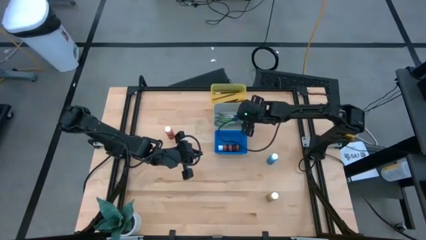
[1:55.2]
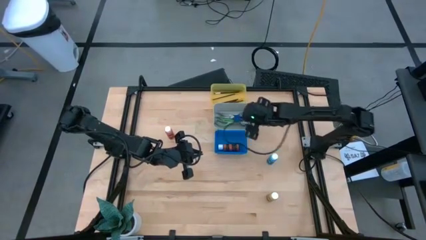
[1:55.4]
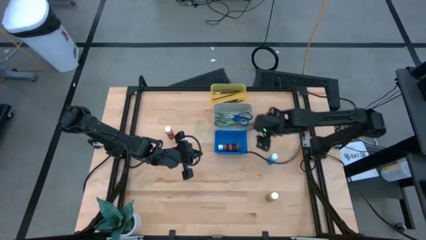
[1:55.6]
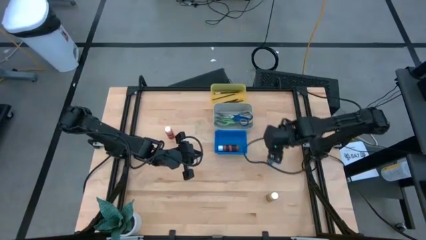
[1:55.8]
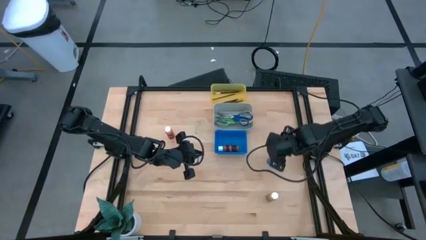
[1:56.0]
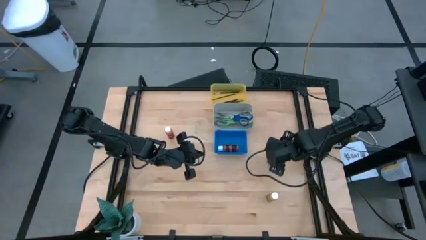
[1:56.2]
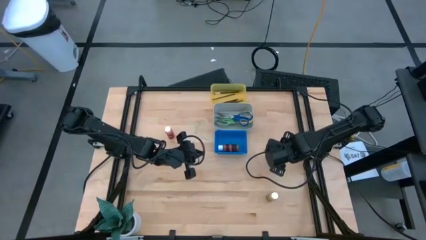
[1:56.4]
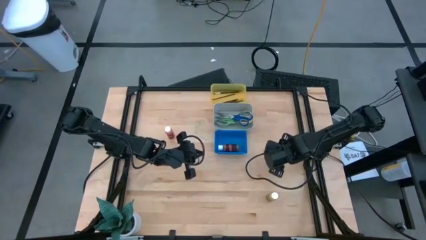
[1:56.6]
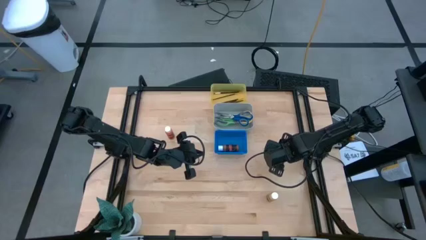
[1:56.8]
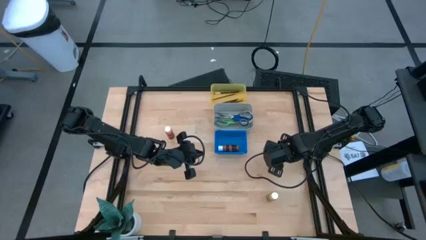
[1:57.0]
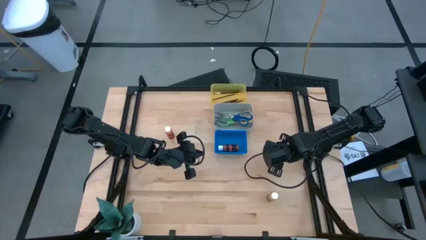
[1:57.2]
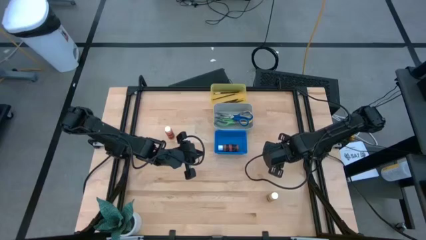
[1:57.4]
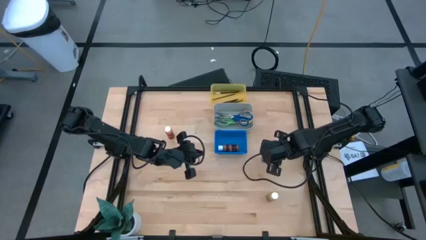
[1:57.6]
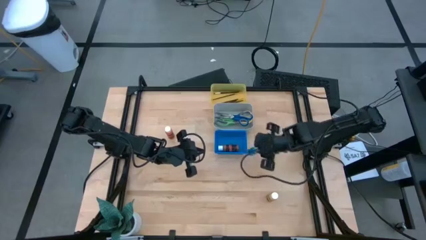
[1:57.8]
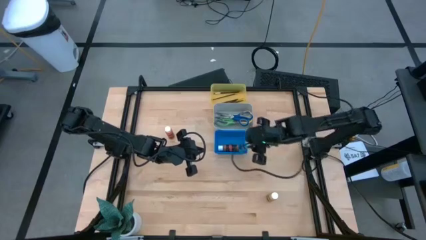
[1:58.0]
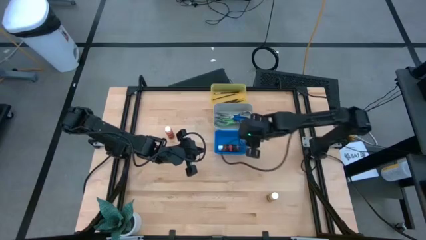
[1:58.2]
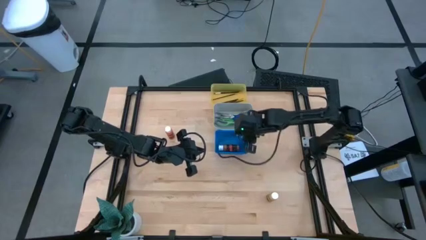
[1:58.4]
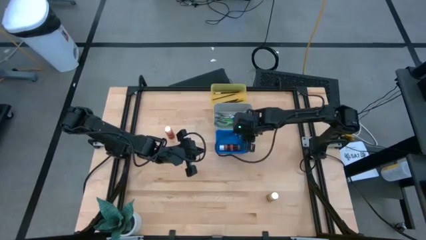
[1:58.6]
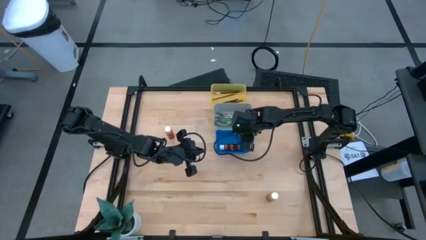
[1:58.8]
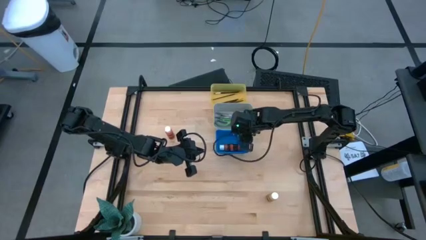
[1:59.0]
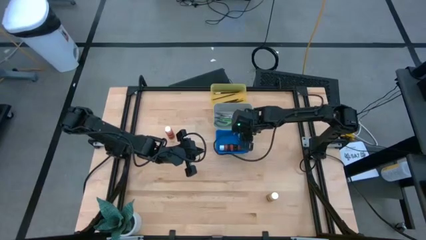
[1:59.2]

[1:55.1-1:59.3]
Task: Pick & Place Paint Supplies
Put the blue paint bottle into the blue bin

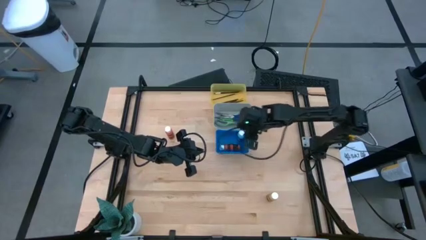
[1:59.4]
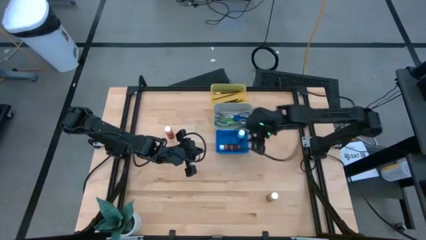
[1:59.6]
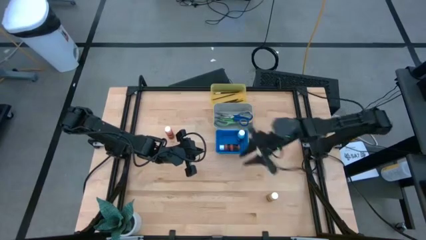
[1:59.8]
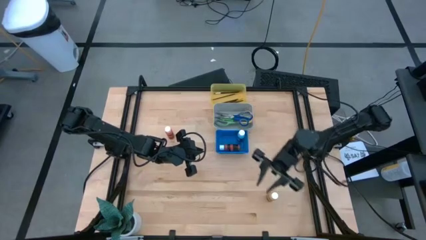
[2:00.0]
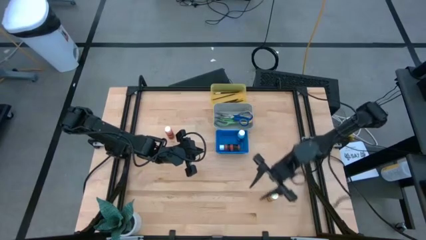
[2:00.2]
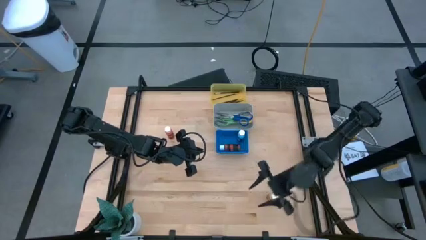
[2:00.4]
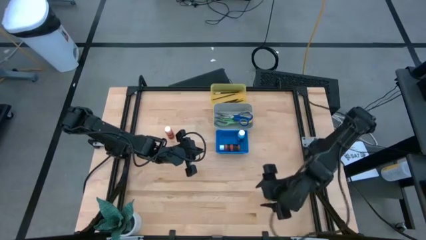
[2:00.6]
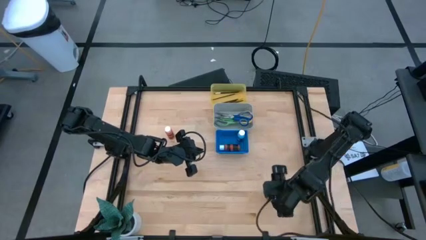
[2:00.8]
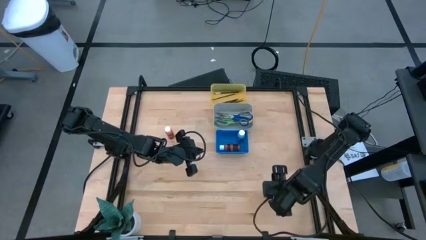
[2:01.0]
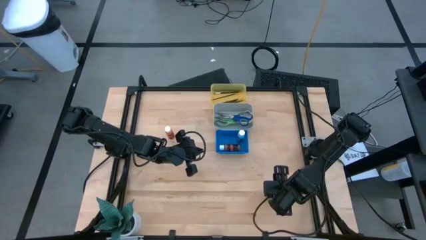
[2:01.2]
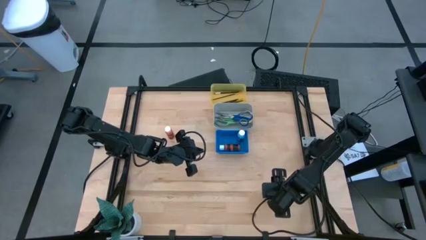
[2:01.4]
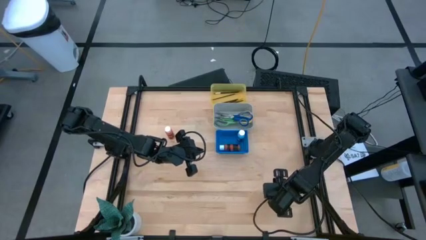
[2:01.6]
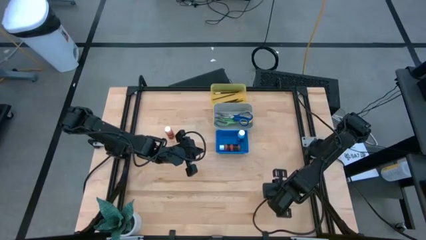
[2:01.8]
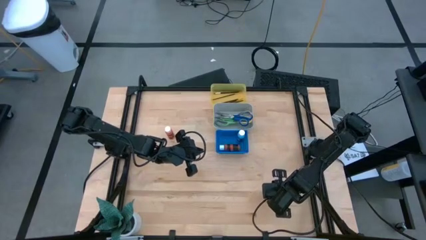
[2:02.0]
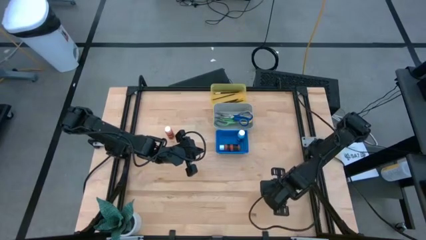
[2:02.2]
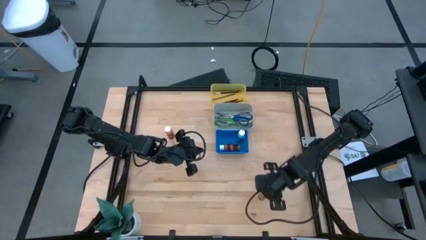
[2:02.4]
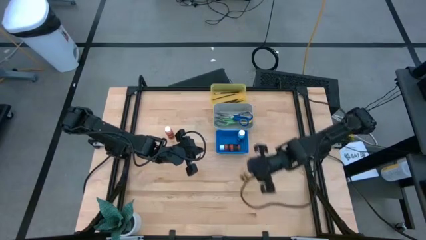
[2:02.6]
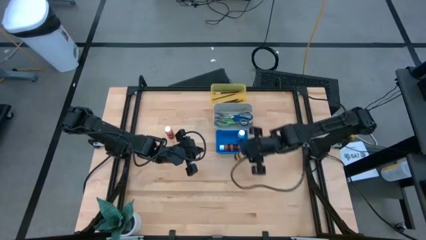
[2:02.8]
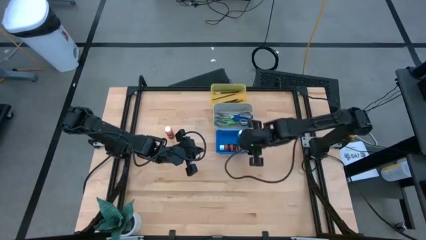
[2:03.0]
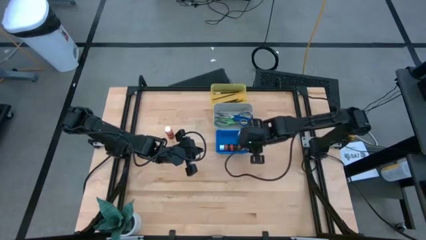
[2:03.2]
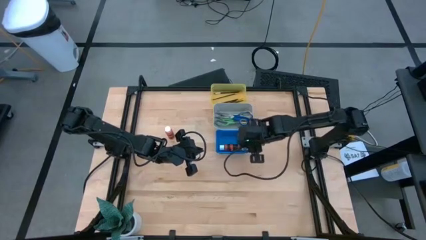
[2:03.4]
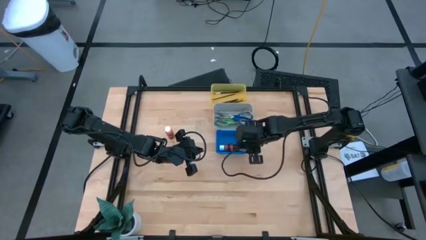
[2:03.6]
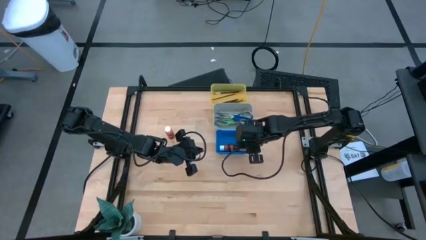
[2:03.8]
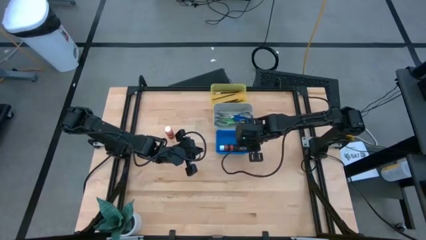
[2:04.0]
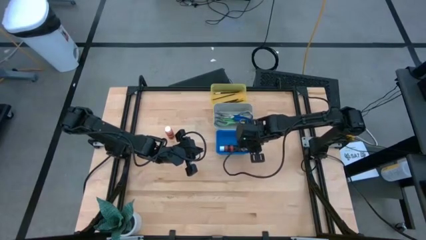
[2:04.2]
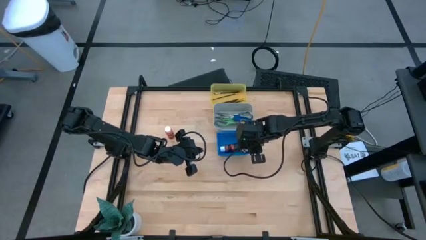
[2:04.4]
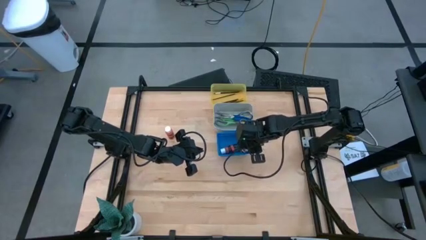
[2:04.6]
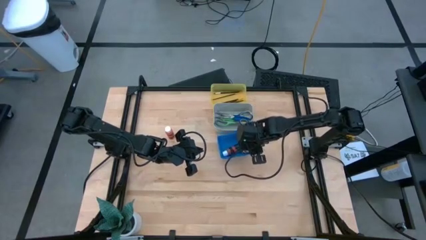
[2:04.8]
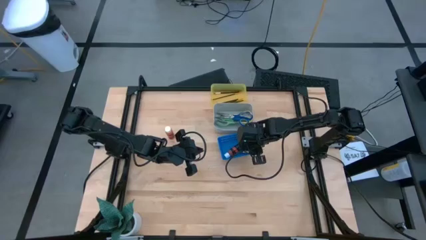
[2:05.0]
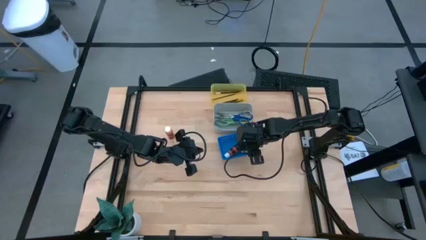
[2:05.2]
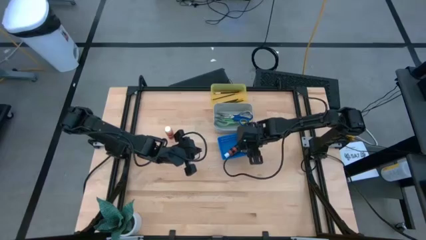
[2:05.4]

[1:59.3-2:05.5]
Put the yellow paint bottle into the blue bin

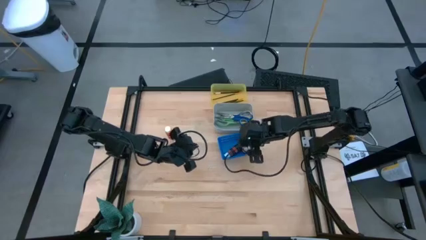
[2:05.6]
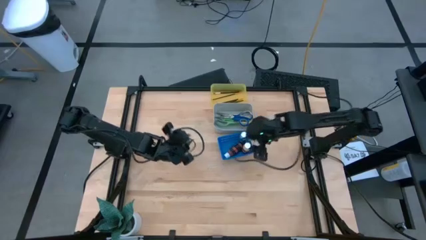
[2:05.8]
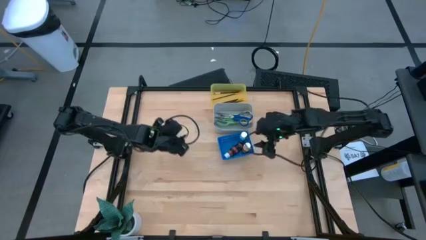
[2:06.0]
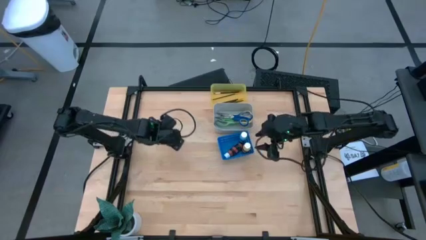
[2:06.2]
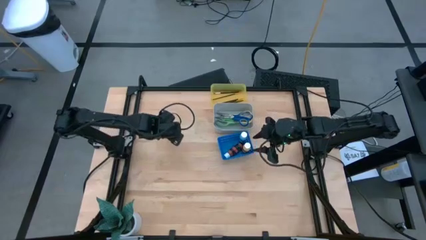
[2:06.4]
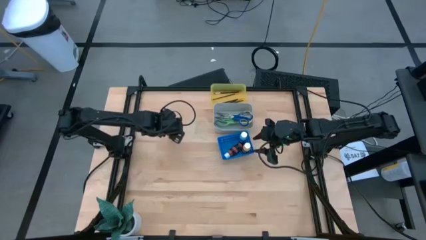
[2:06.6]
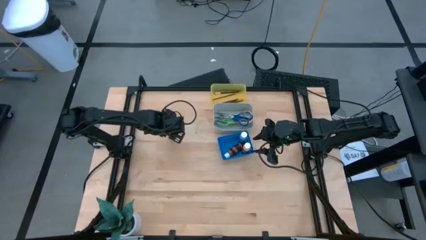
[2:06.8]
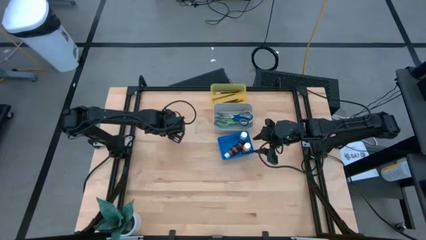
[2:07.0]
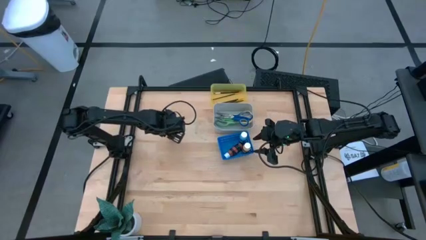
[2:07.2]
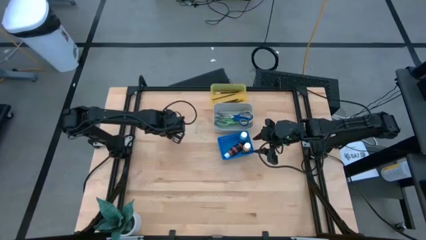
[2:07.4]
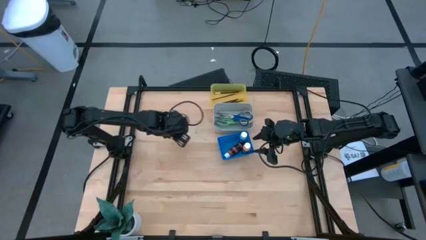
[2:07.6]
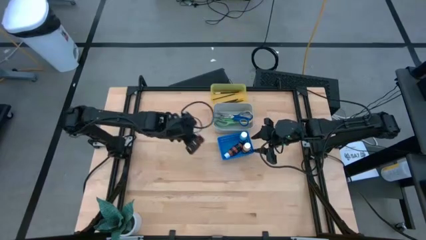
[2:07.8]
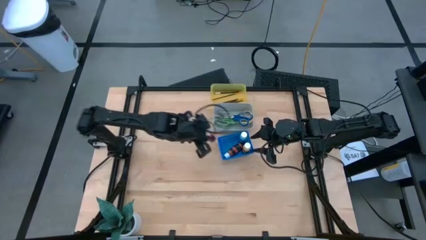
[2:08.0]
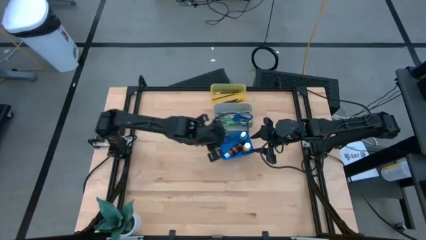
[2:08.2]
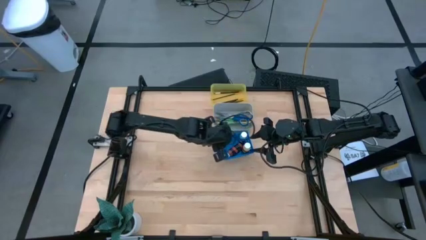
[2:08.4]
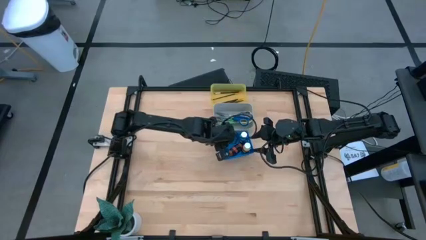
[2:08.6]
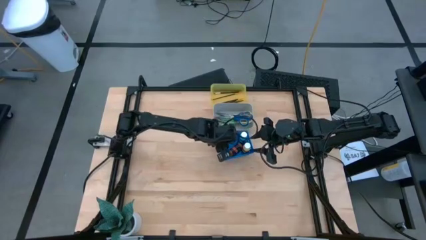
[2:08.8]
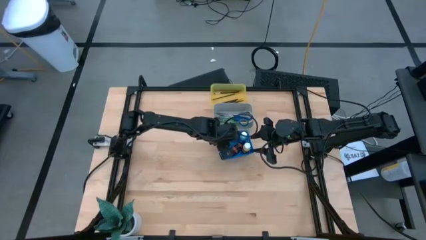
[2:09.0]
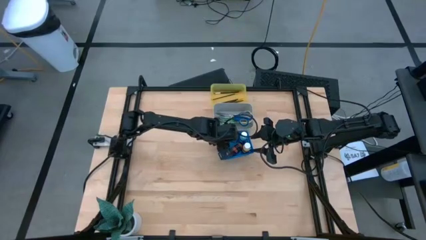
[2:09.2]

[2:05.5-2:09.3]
Put the orange paint bottle into the blue bin

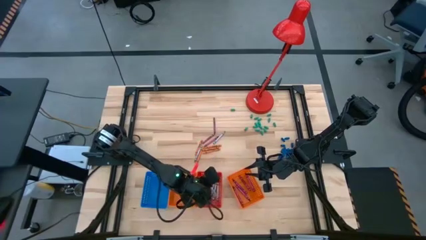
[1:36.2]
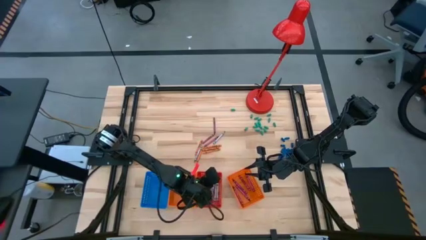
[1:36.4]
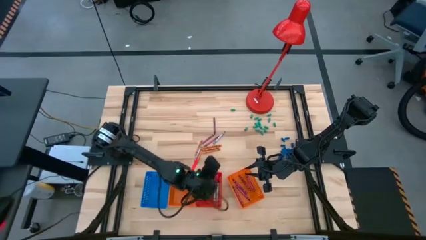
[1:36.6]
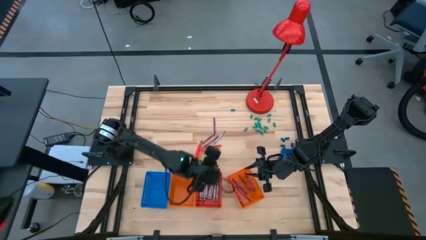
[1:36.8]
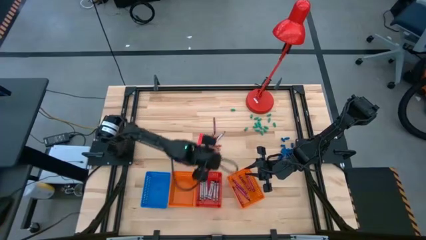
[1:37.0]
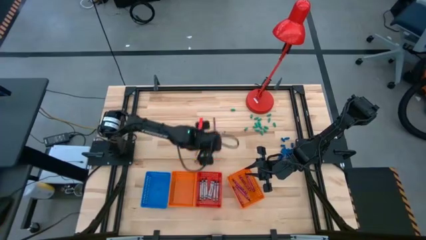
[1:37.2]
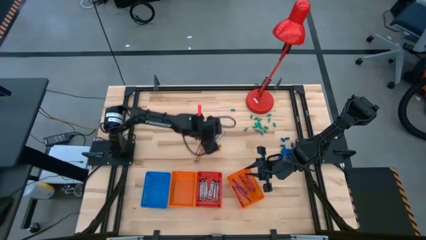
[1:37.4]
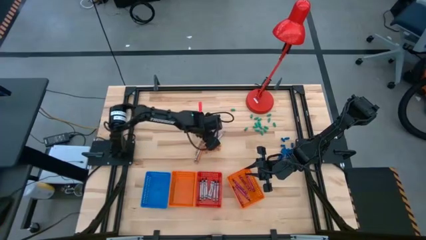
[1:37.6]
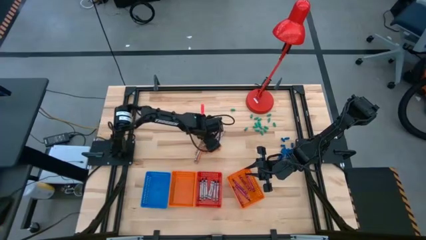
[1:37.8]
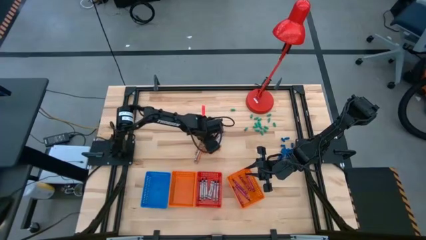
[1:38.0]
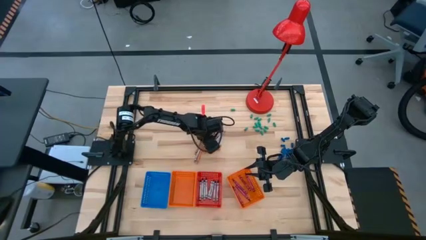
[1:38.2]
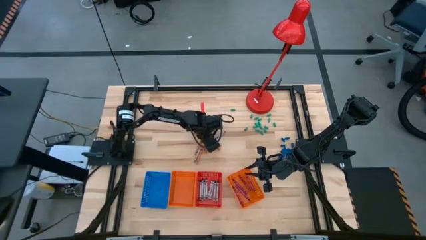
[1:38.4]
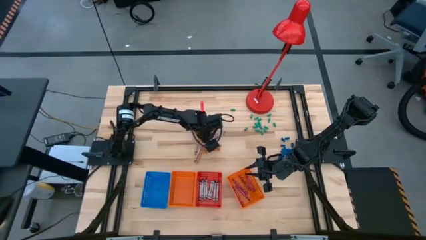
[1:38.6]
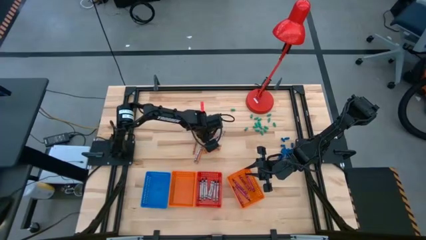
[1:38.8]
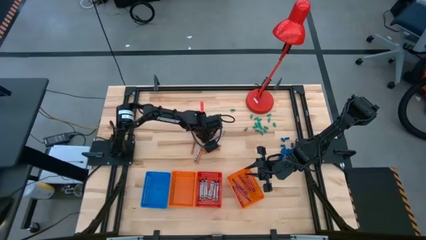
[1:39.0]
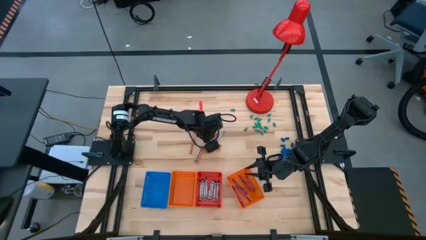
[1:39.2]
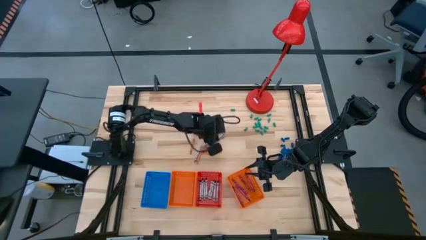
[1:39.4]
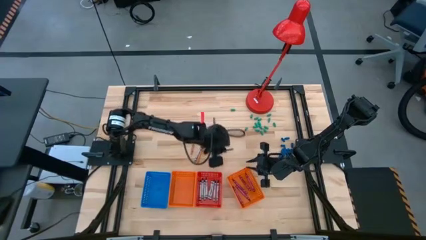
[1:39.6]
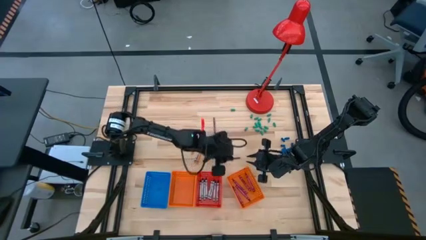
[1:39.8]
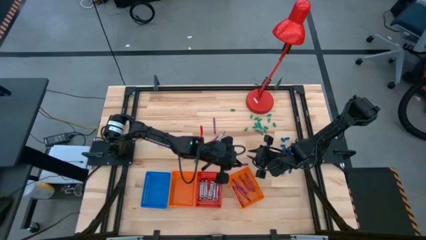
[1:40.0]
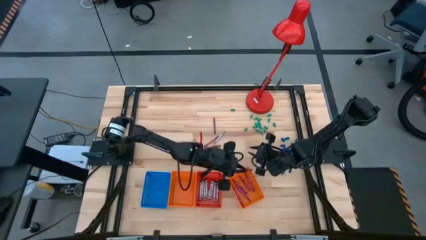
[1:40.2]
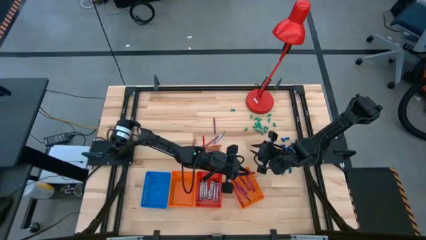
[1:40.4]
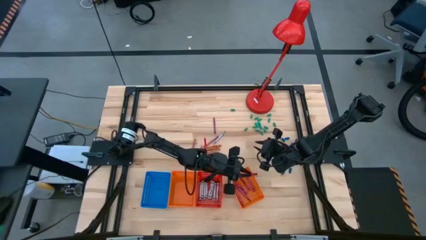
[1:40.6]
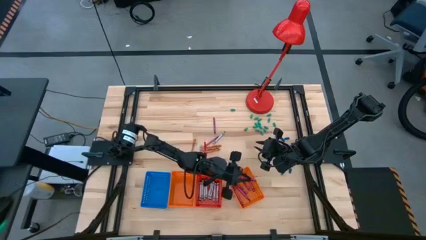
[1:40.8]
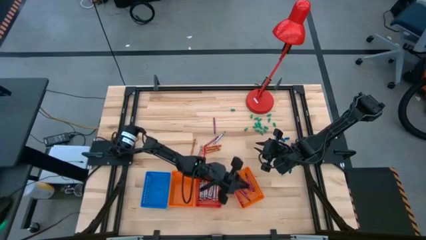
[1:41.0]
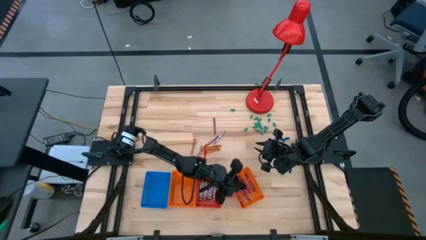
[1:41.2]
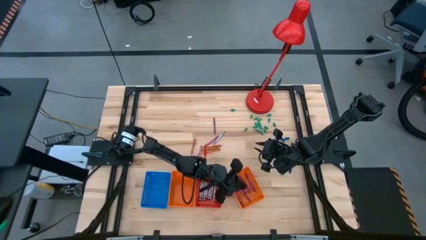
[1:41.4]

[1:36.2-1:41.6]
Task: Sort crayons
Put the red crayon into the right orange bin
